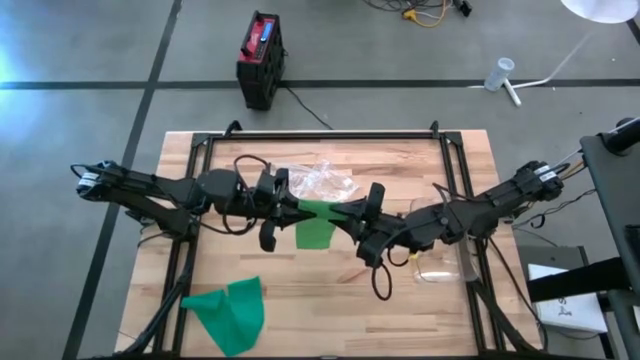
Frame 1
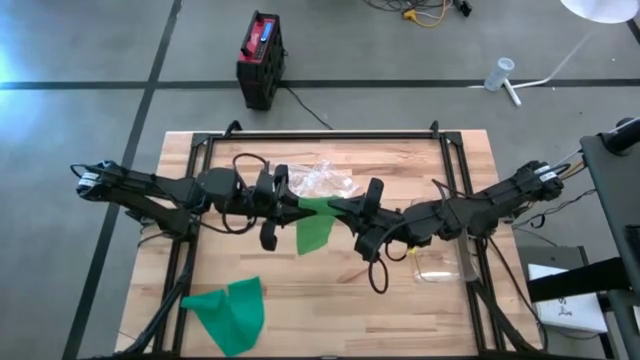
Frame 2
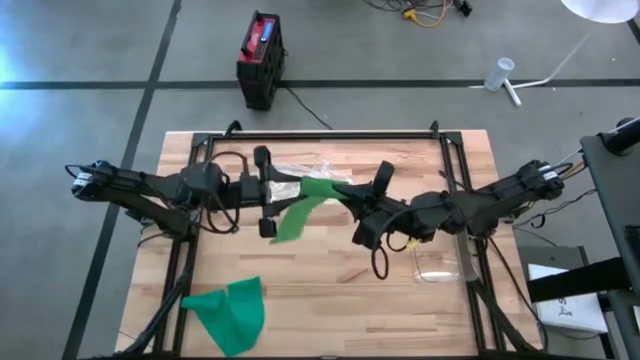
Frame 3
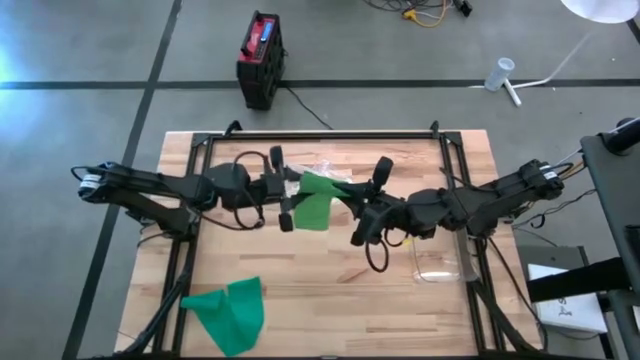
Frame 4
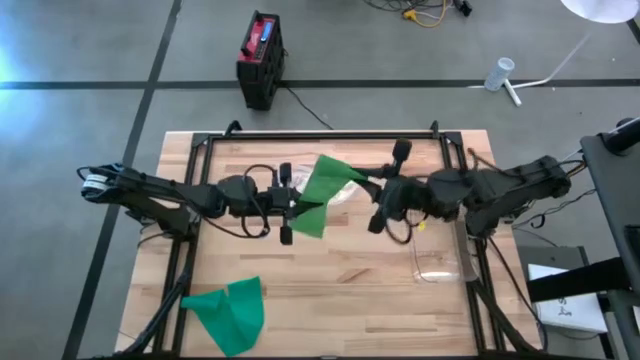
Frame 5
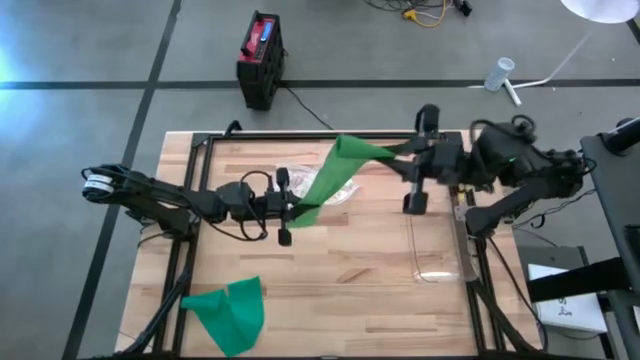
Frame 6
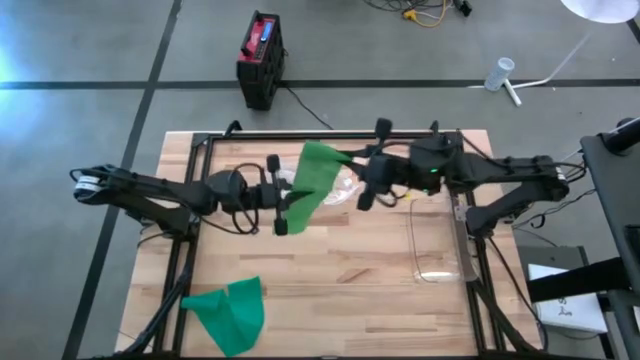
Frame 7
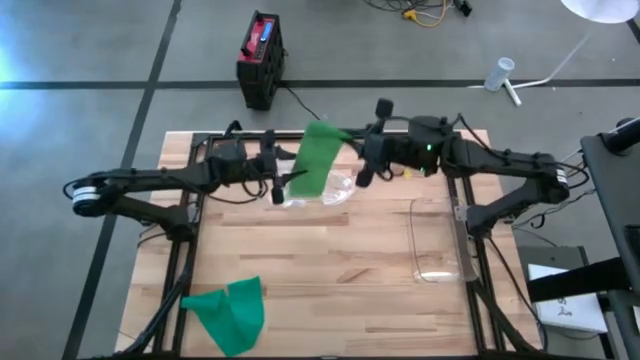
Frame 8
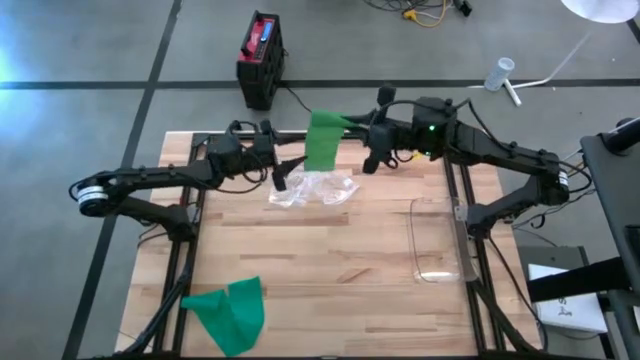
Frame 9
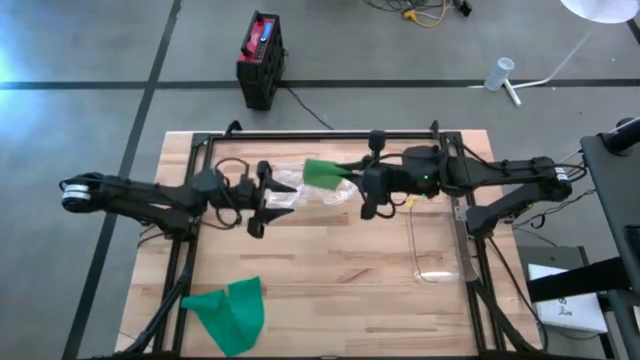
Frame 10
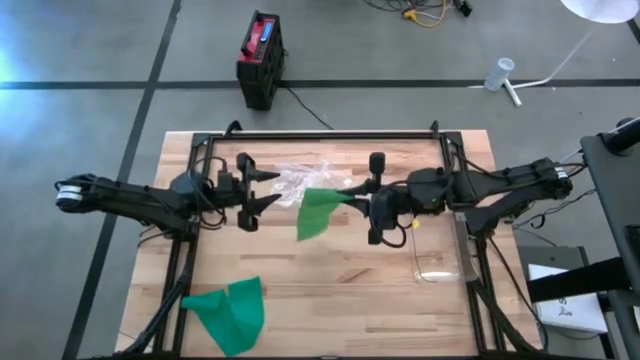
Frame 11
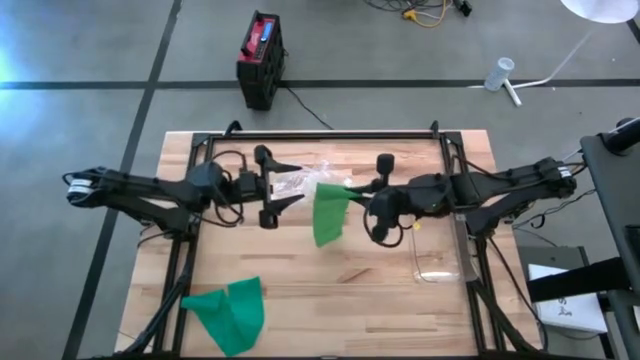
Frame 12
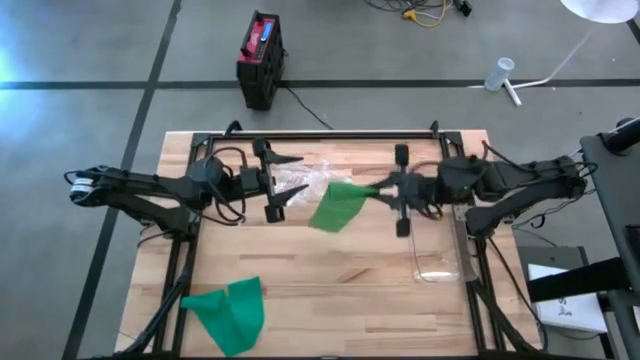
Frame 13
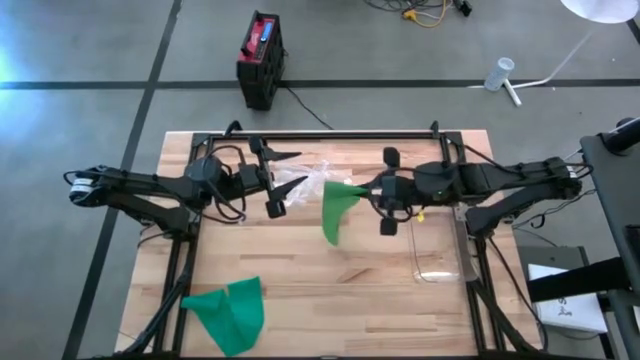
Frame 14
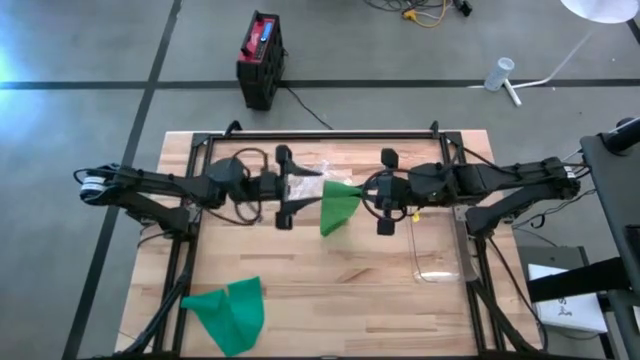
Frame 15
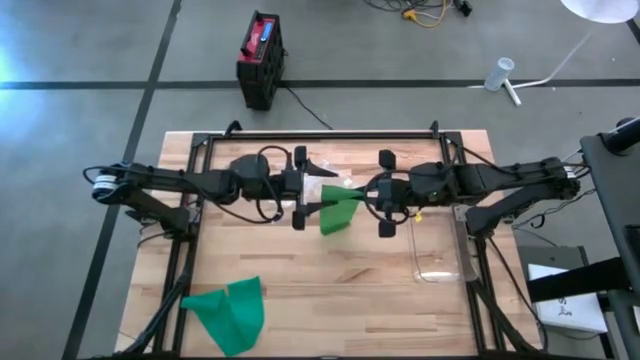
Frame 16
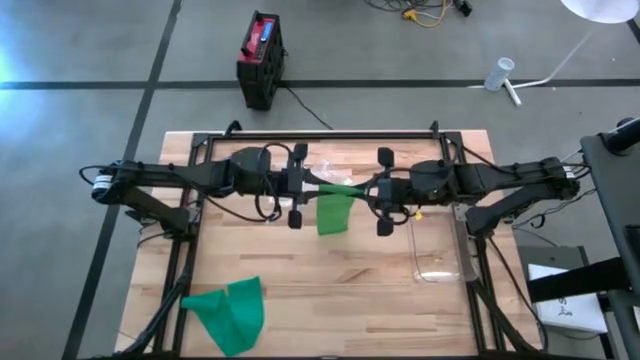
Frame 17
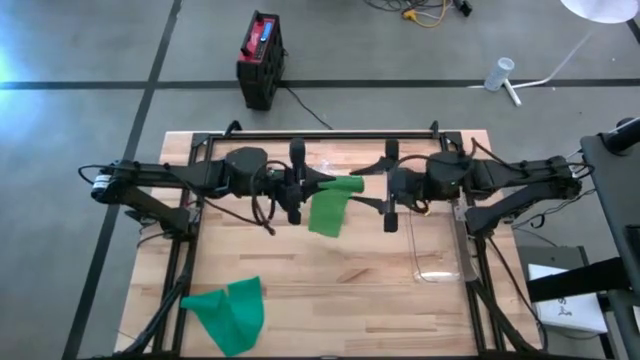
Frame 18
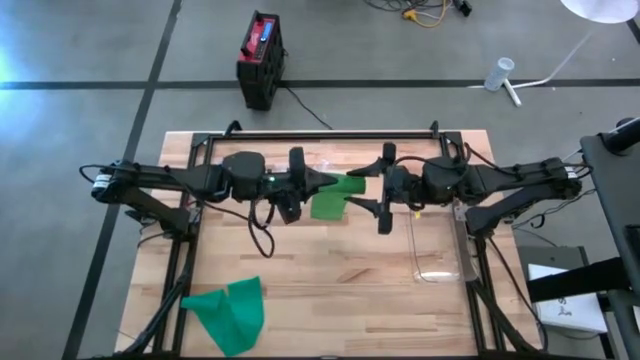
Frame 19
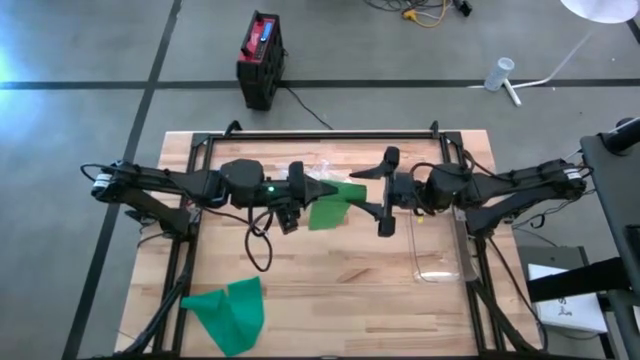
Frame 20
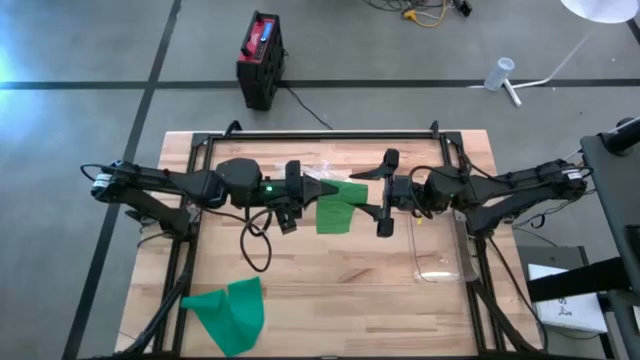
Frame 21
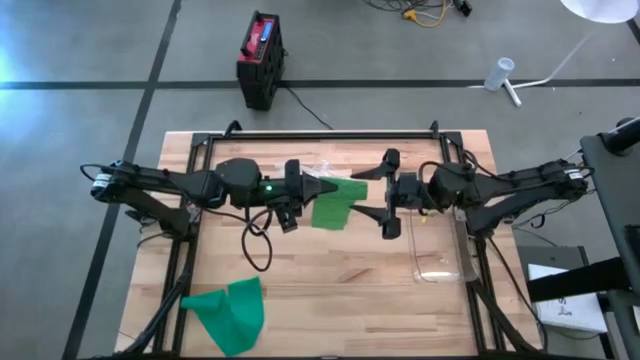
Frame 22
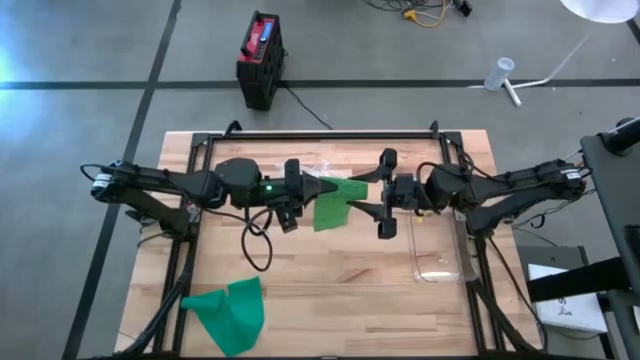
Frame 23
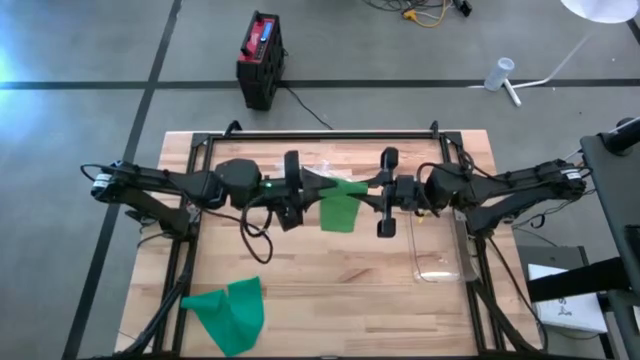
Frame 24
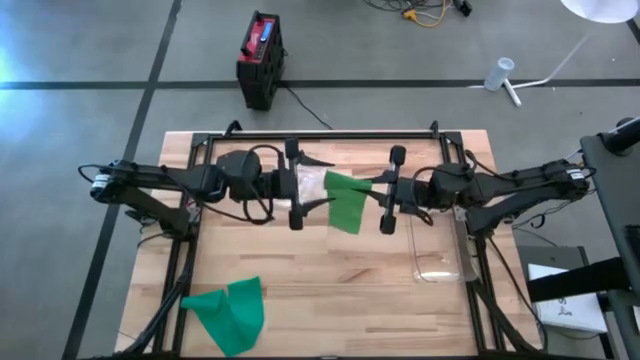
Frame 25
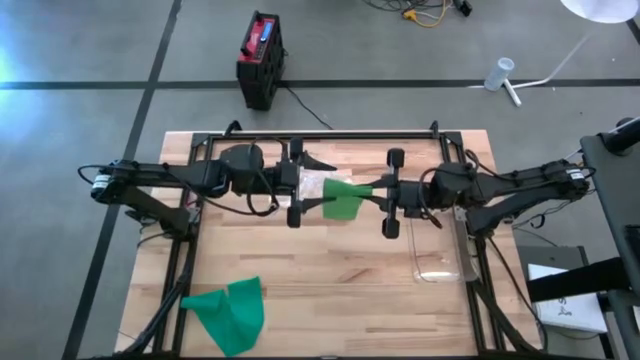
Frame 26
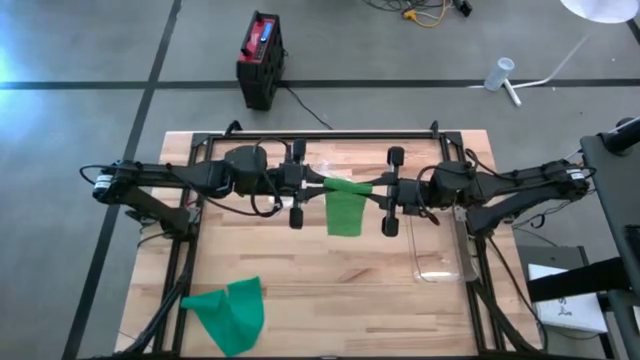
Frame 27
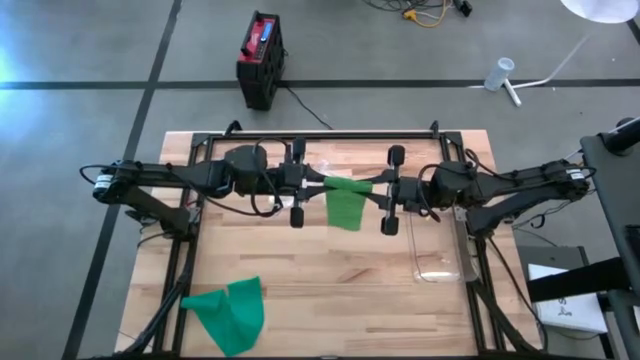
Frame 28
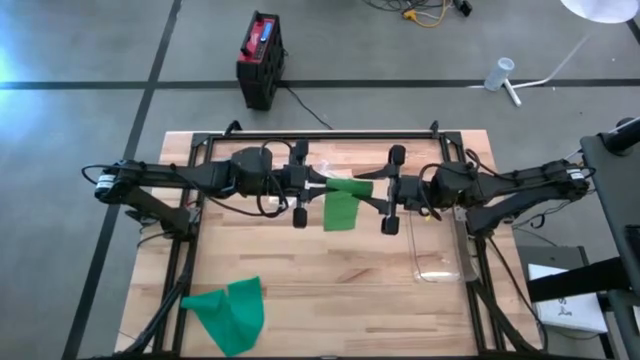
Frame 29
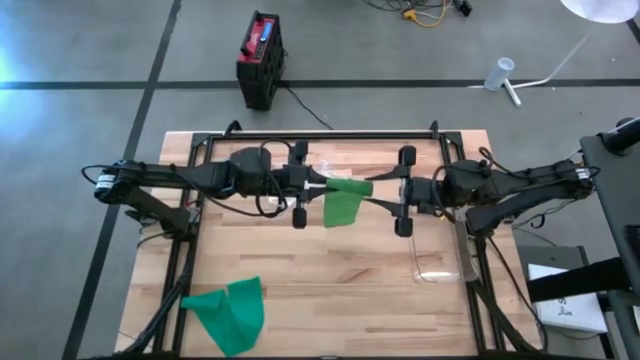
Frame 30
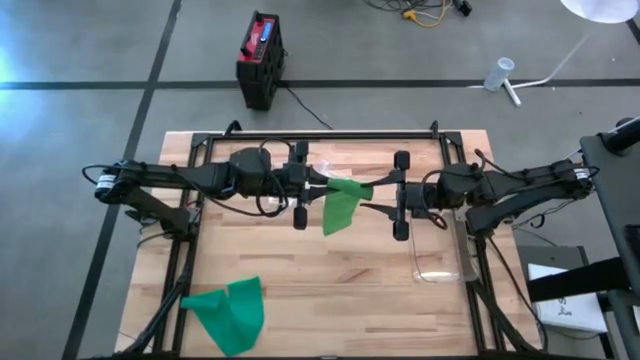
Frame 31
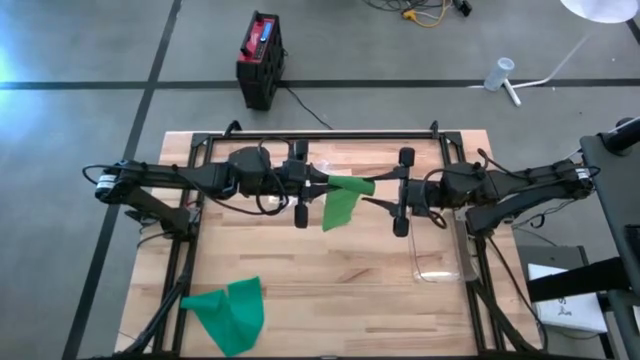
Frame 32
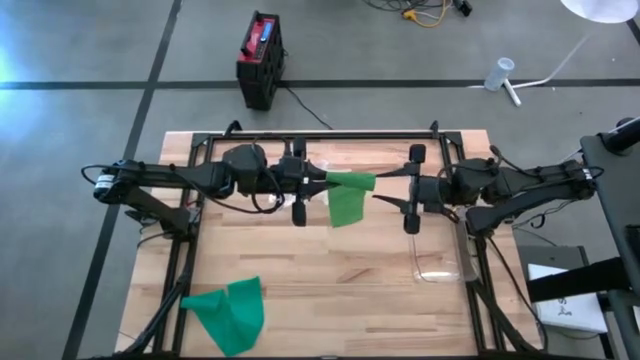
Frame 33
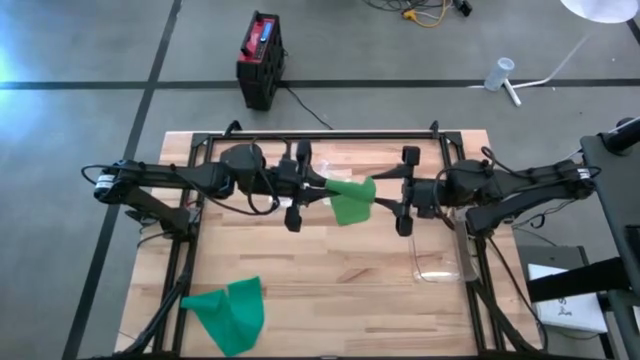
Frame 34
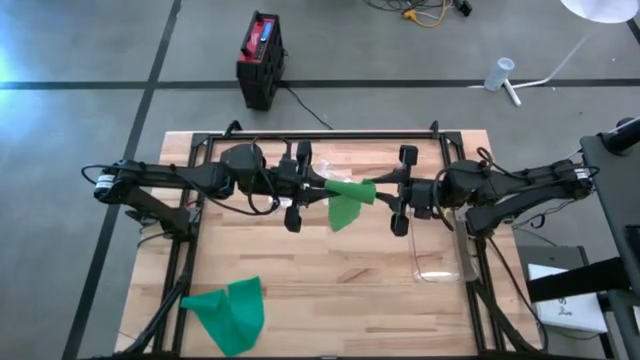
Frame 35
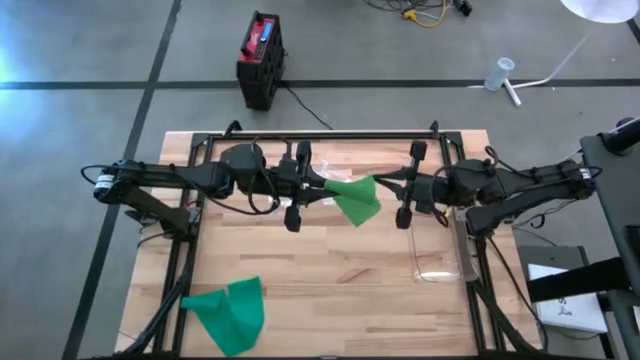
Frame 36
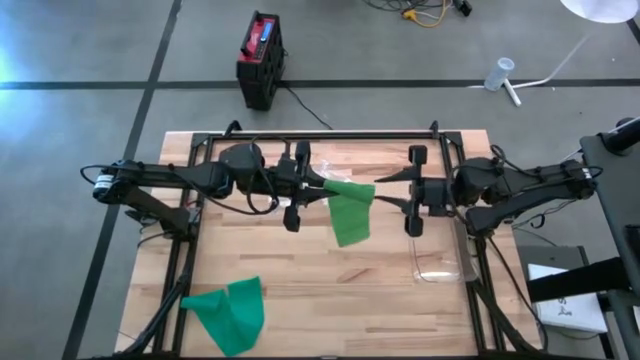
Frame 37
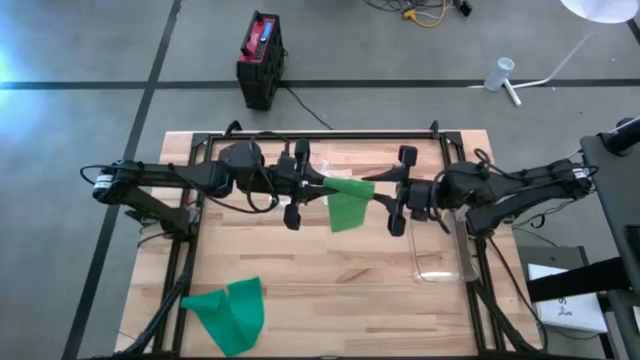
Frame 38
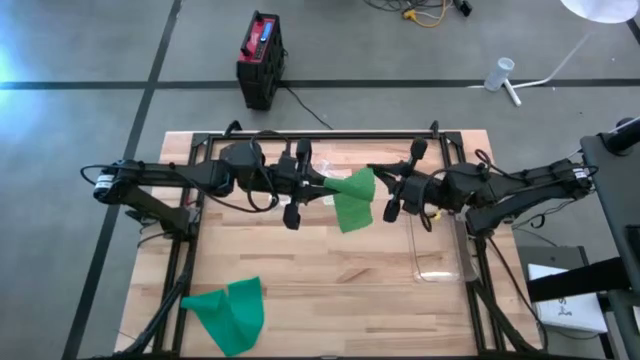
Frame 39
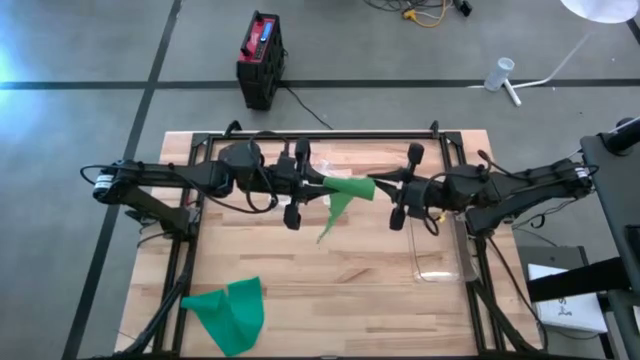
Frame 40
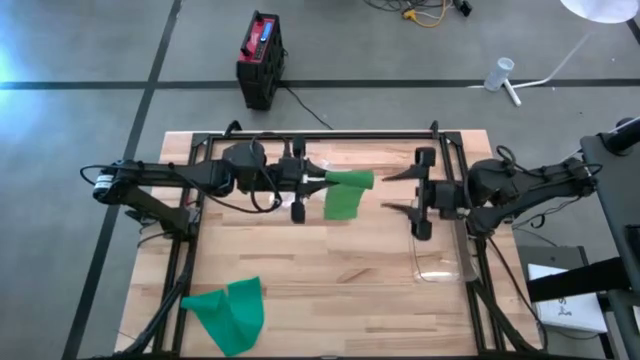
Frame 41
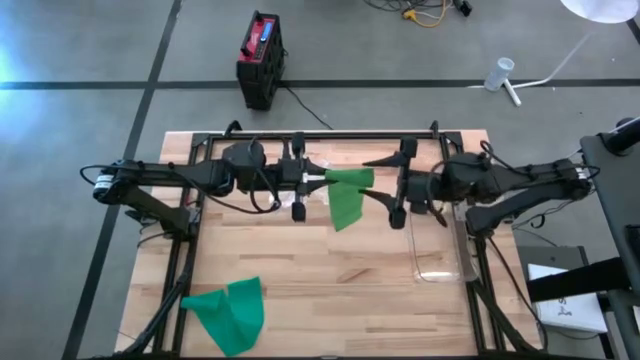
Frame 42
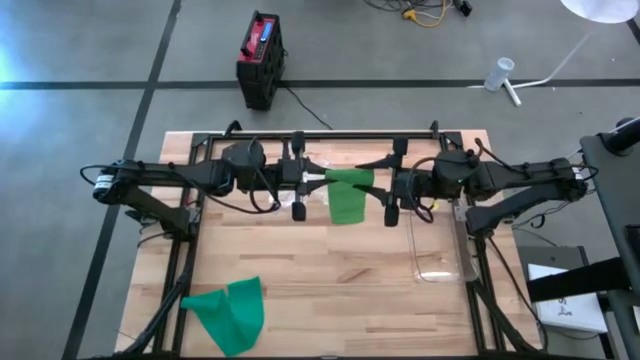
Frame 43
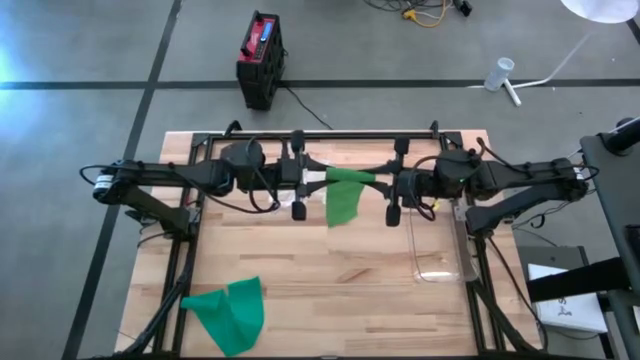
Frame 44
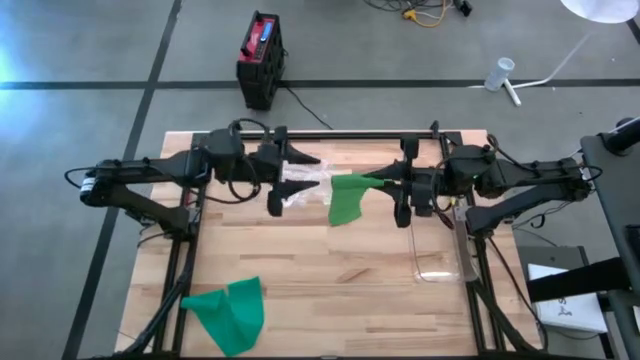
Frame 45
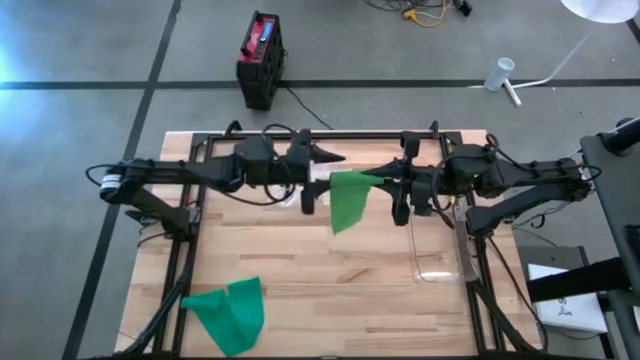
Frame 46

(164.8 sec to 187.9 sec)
Task: Roll bandage
Roll the green bandage
